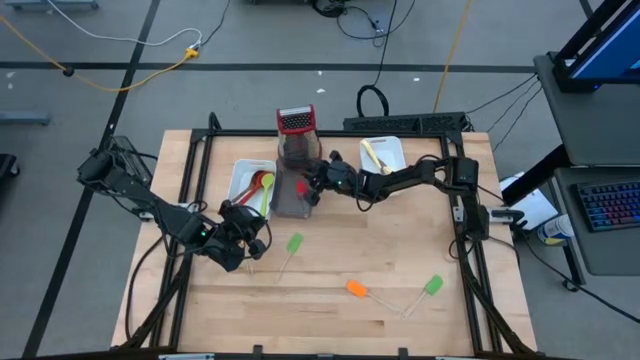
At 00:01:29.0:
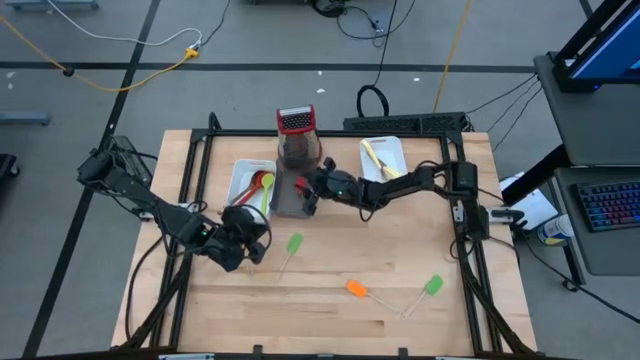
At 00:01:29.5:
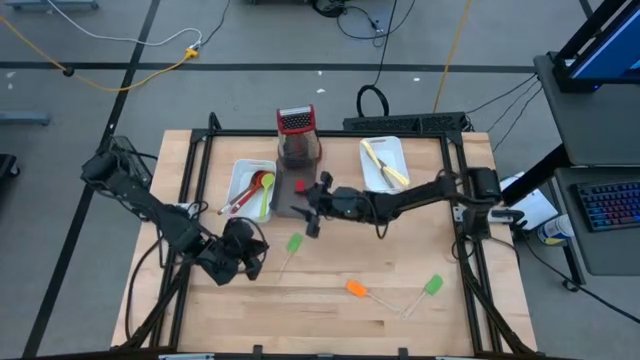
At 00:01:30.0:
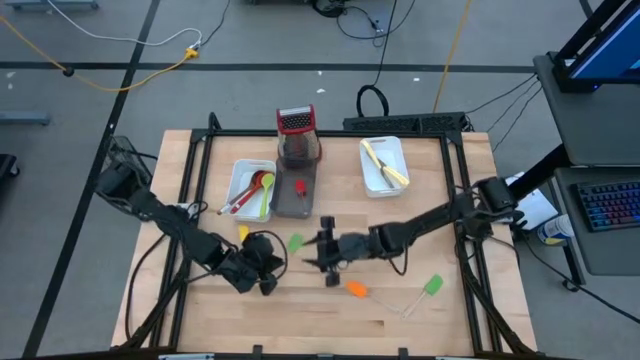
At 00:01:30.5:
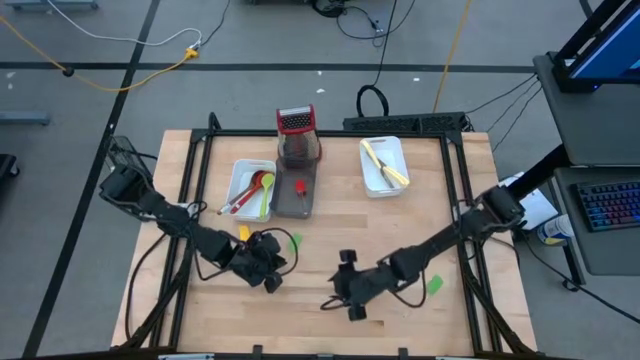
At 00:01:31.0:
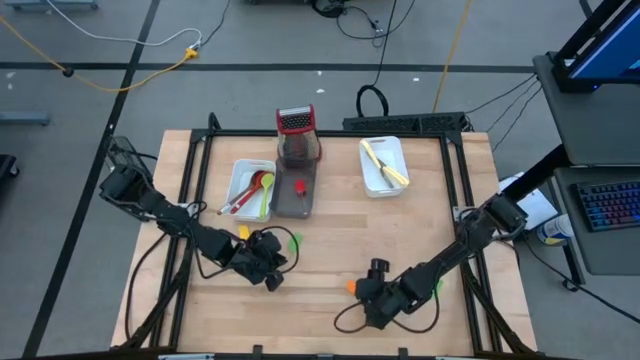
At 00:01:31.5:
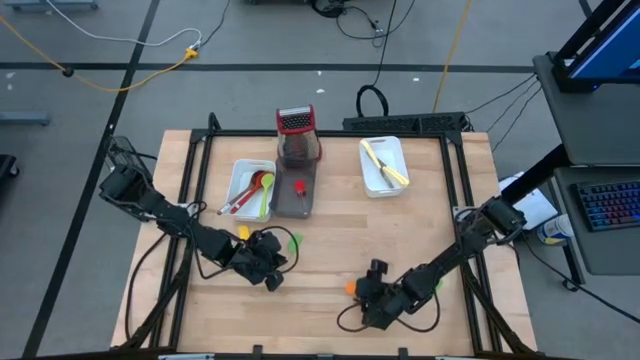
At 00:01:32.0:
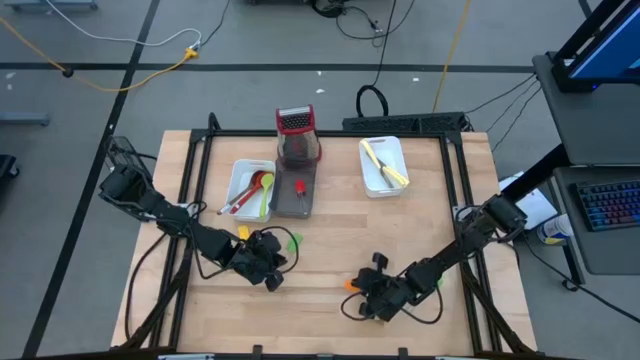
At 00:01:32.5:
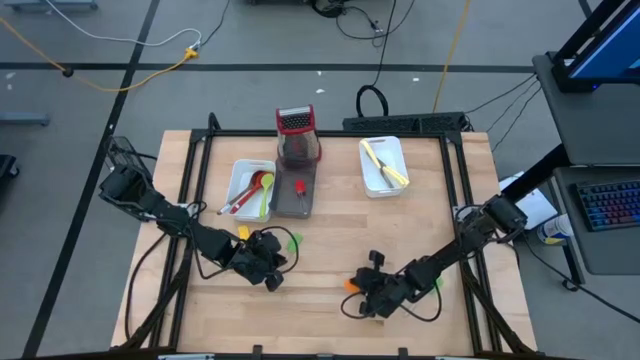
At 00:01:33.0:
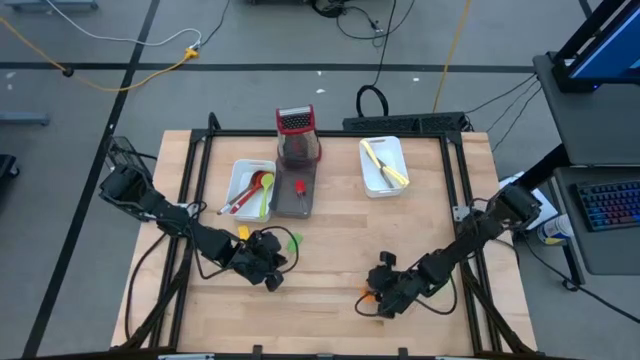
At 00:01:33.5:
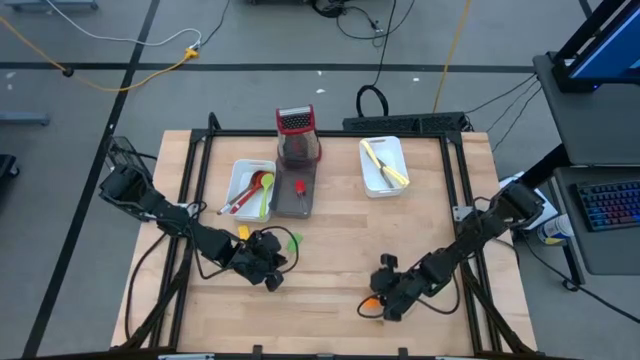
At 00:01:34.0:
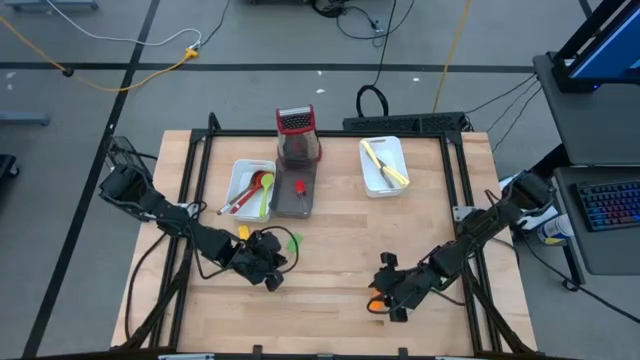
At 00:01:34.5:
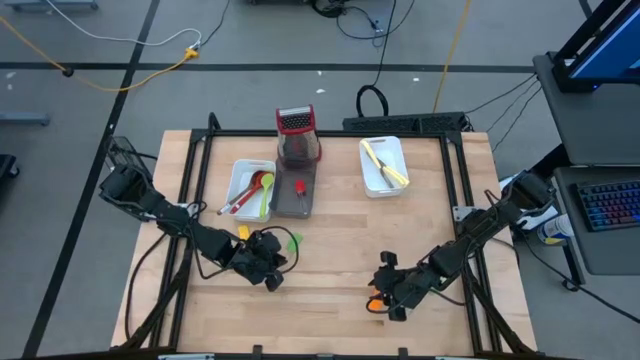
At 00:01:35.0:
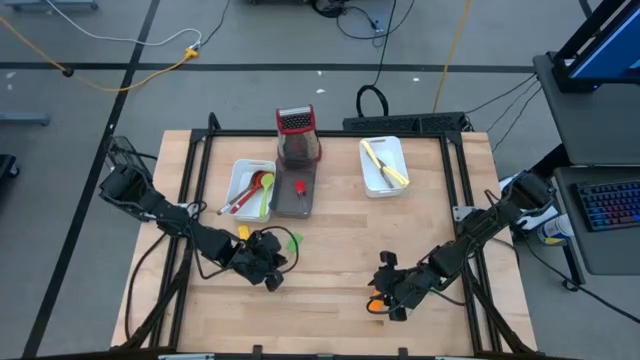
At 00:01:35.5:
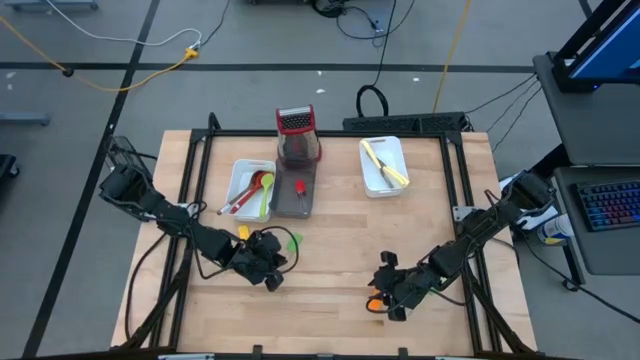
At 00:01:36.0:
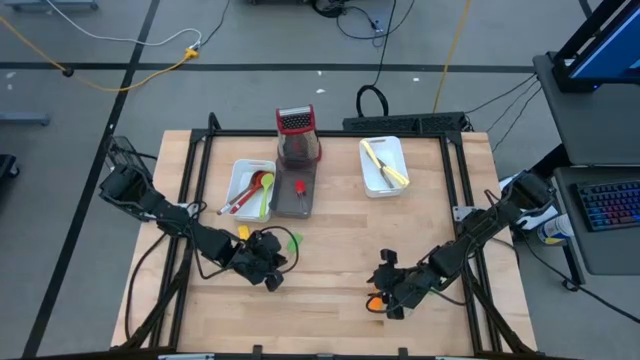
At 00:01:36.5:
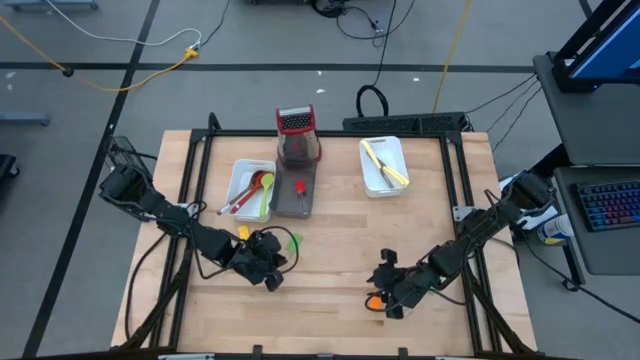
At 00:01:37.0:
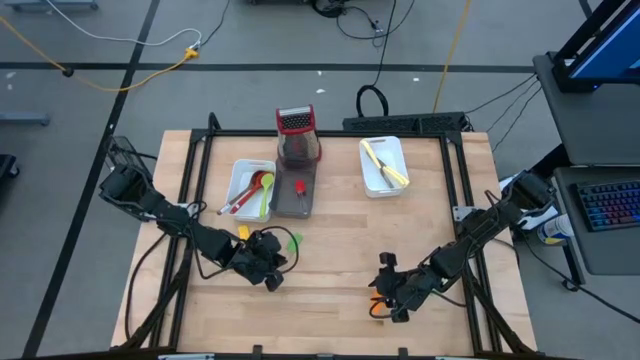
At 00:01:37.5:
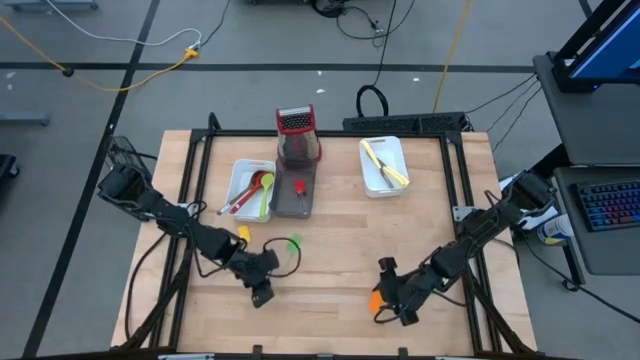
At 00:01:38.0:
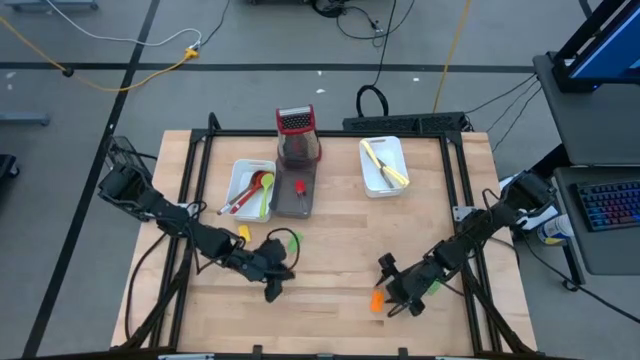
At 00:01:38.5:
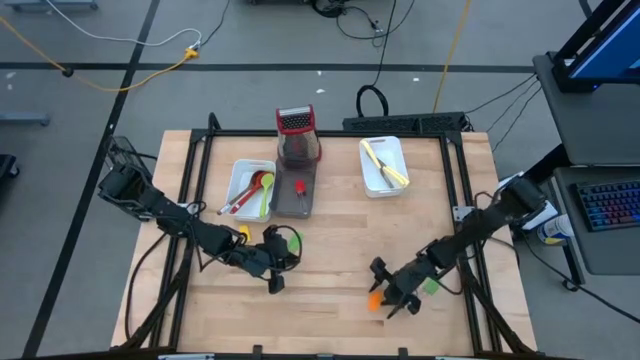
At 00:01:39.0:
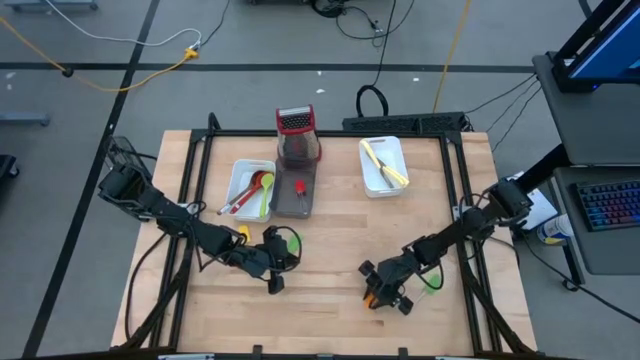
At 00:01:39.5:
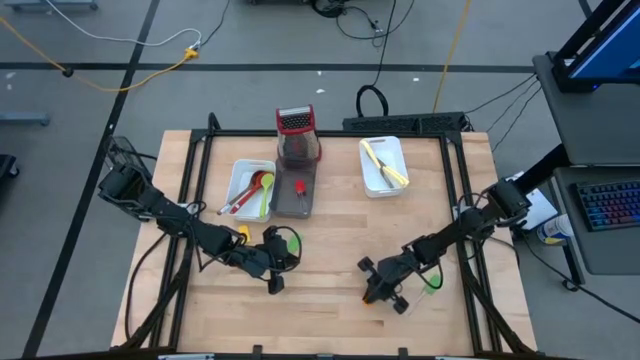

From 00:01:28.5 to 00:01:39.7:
Task: Pick & Place Kitchen Items
Put the orange spatula into the black bin

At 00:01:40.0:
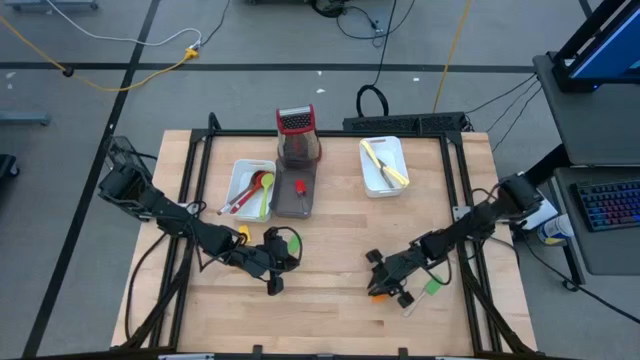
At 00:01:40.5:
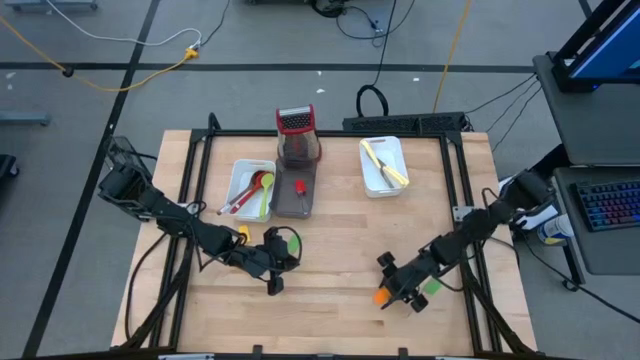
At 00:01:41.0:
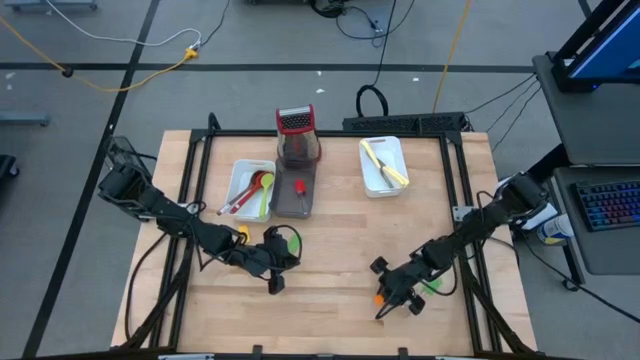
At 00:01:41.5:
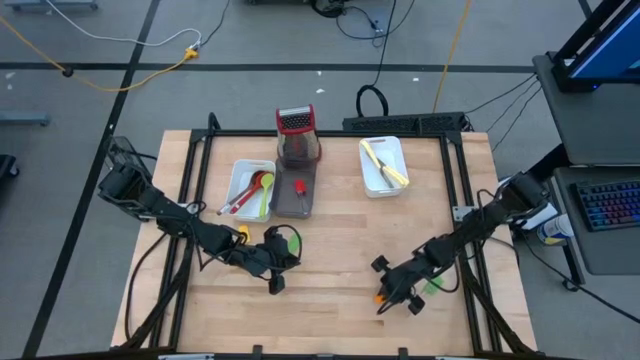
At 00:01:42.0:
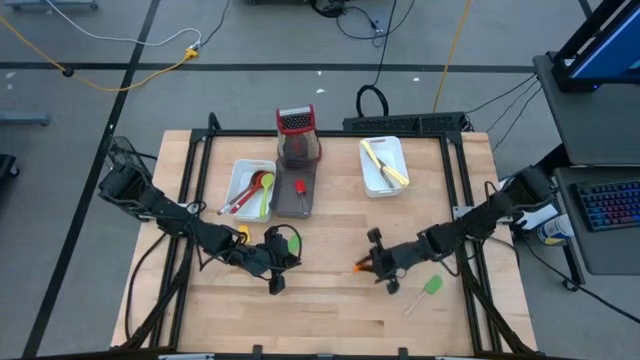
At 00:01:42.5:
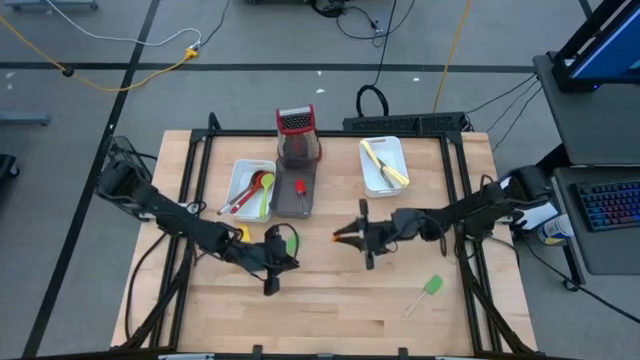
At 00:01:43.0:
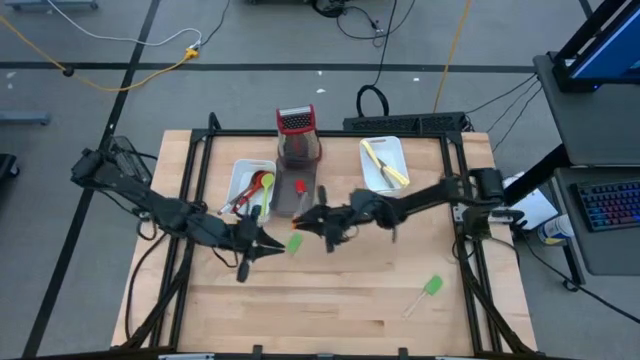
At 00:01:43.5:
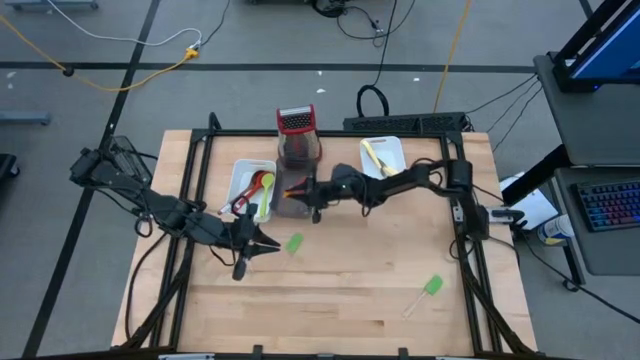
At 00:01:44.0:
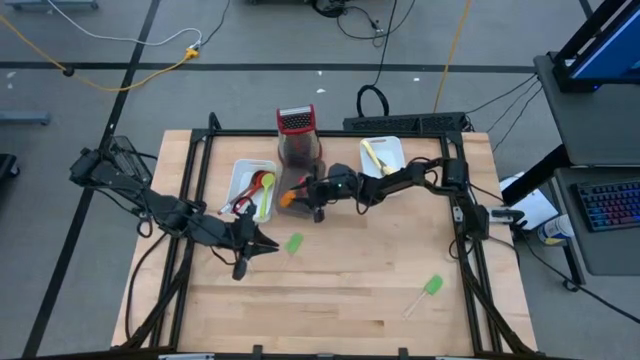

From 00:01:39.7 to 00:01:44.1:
Put the orange spatula into the black bin

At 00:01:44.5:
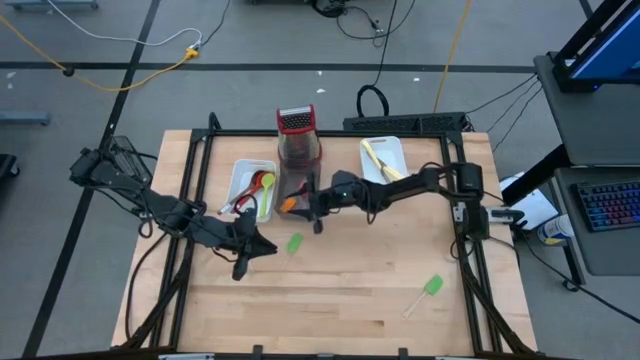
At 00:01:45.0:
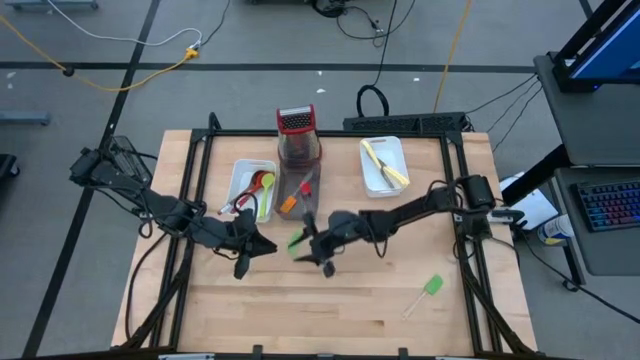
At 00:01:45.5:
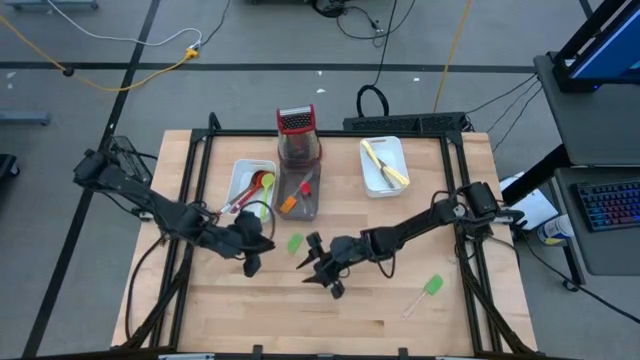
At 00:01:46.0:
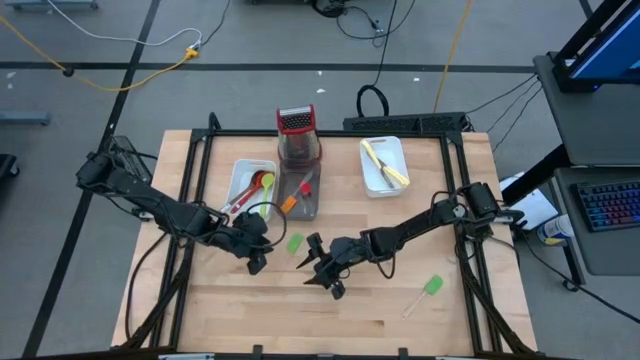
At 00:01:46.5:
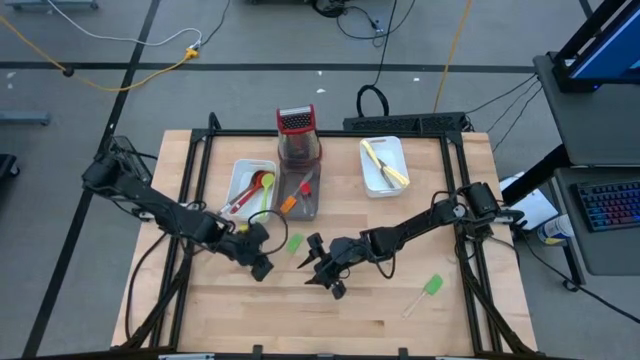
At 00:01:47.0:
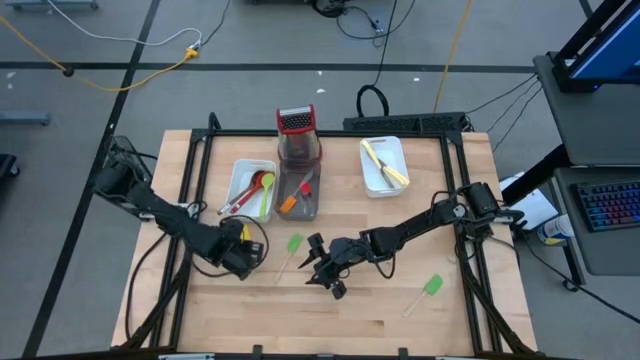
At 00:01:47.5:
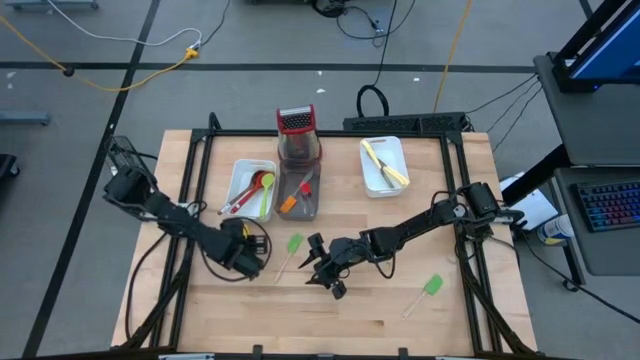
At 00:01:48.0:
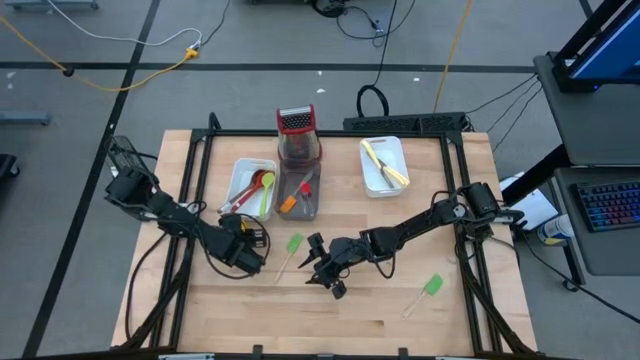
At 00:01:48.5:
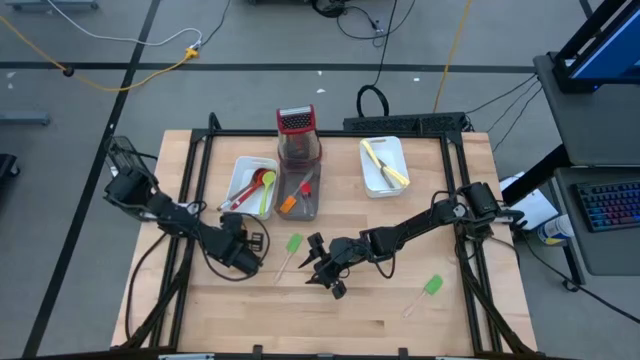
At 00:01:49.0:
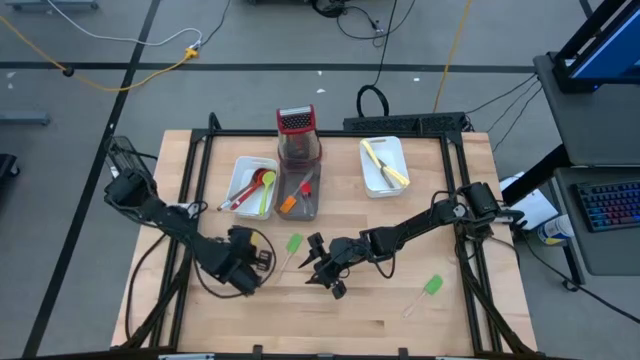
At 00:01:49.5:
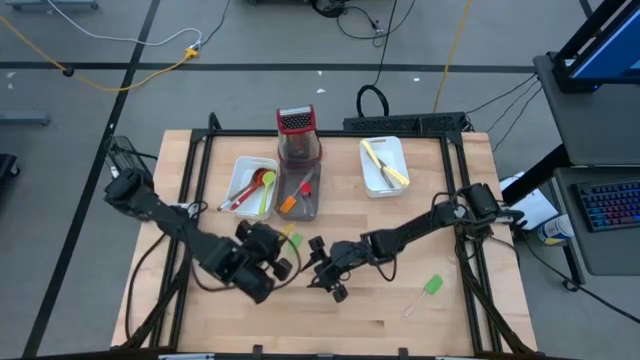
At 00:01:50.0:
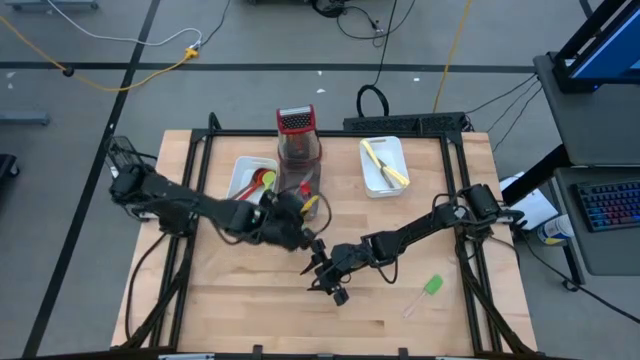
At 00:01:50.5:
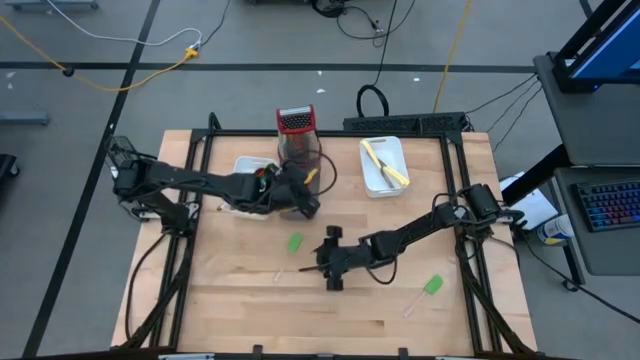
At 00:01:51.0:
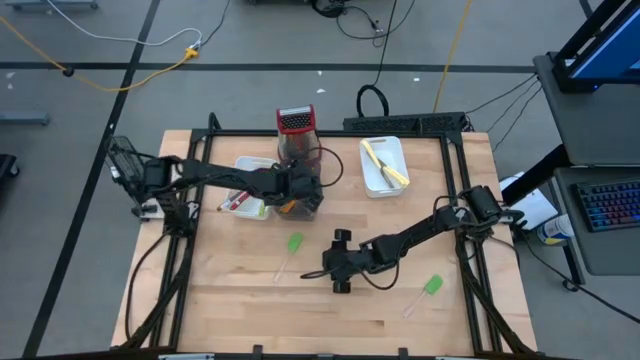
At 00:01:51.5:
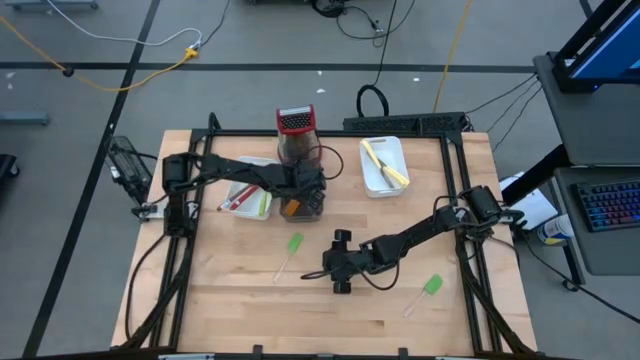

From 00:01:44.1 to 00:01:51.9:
Put the yellow spatula into the black bin
